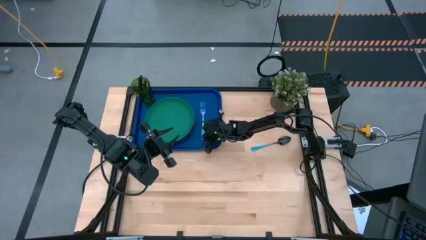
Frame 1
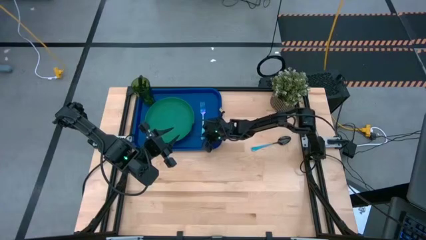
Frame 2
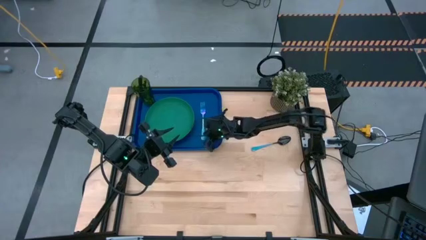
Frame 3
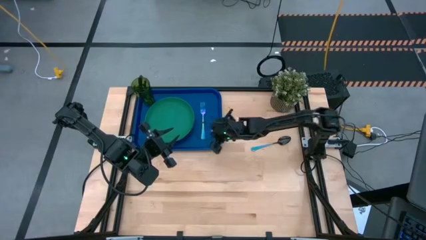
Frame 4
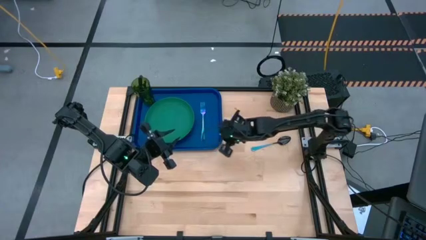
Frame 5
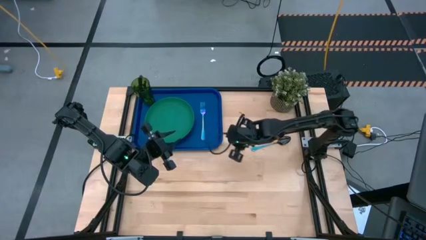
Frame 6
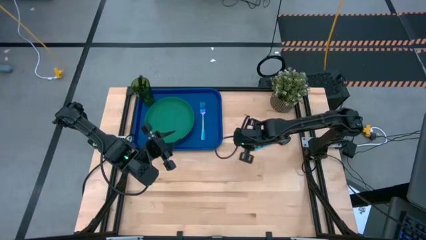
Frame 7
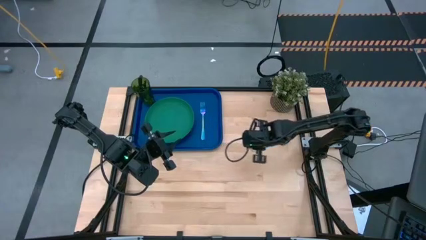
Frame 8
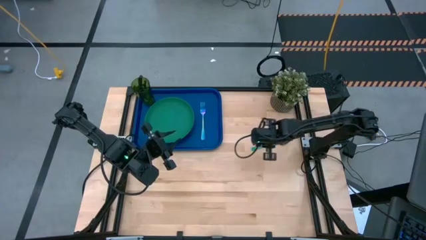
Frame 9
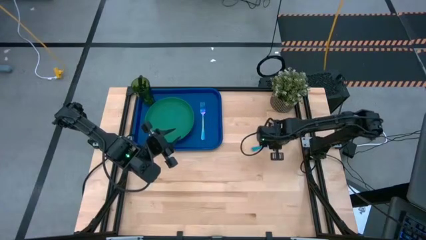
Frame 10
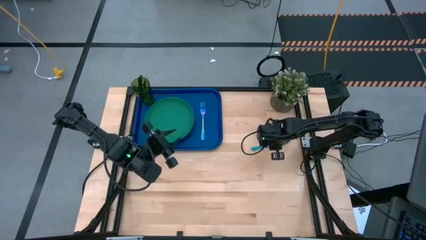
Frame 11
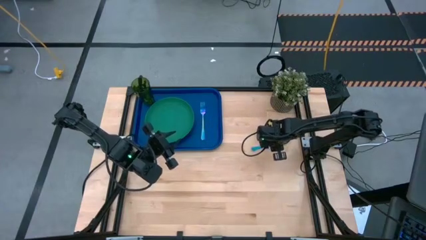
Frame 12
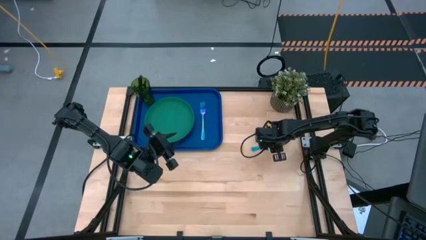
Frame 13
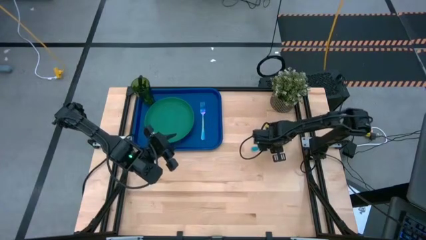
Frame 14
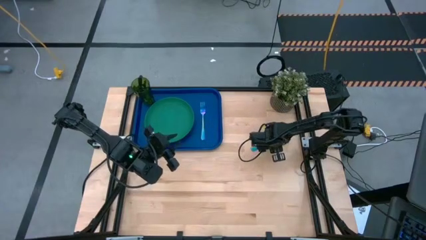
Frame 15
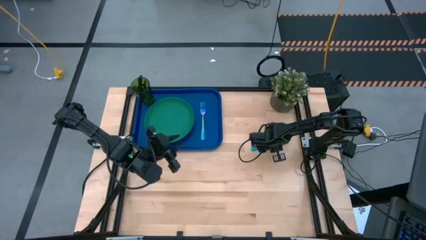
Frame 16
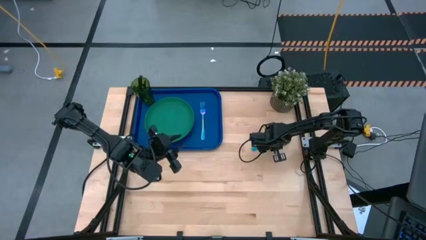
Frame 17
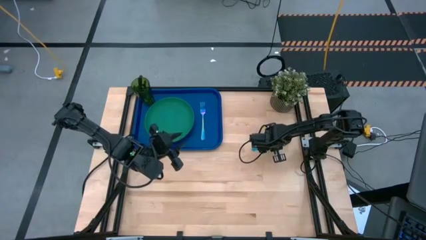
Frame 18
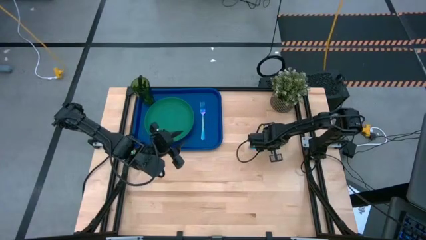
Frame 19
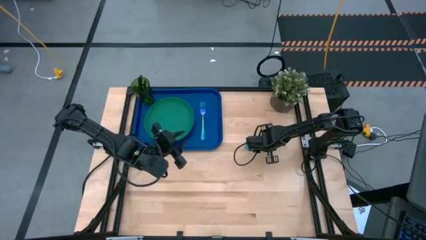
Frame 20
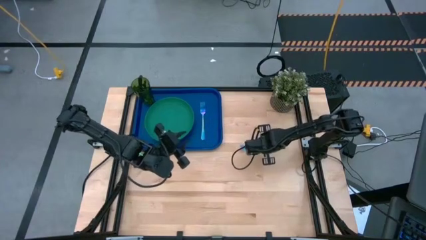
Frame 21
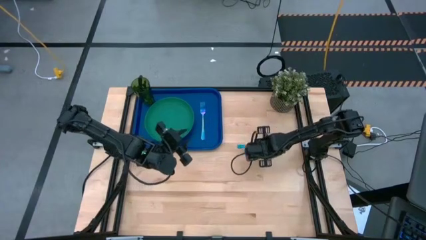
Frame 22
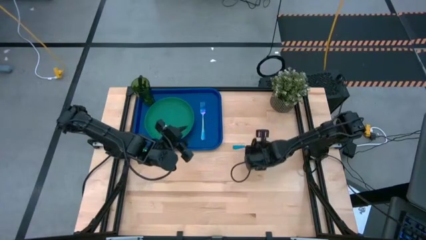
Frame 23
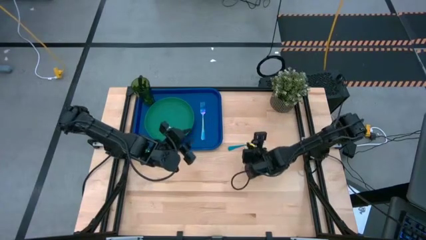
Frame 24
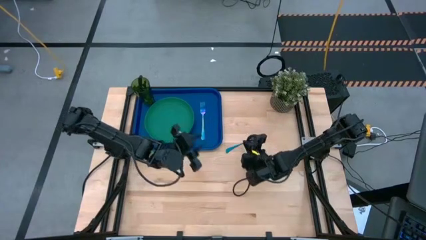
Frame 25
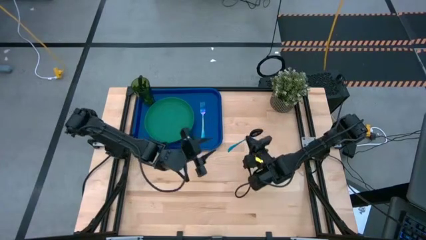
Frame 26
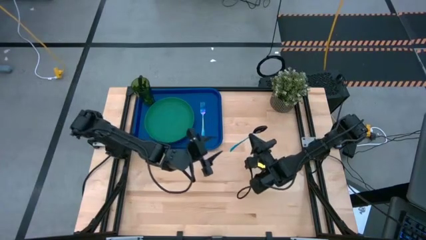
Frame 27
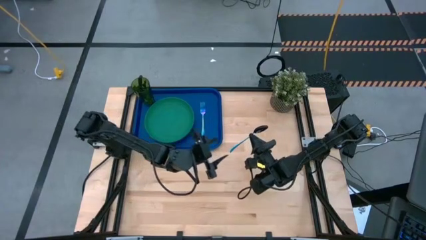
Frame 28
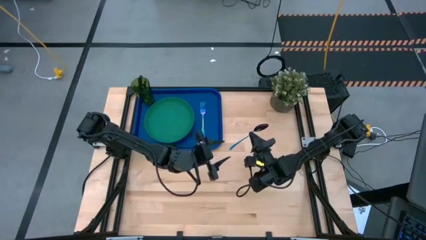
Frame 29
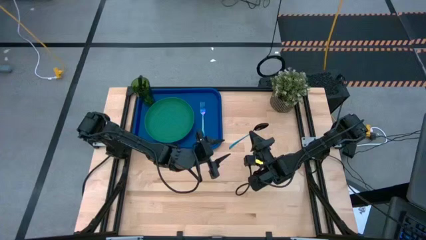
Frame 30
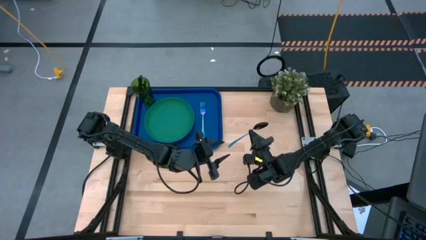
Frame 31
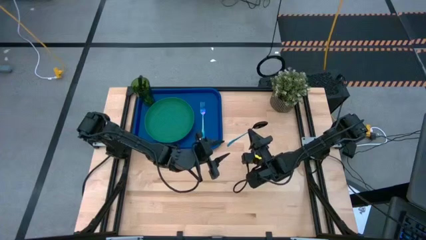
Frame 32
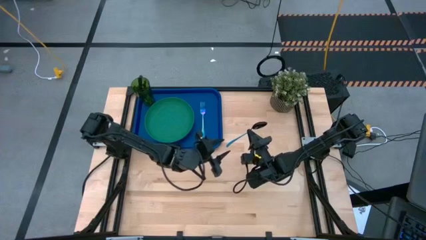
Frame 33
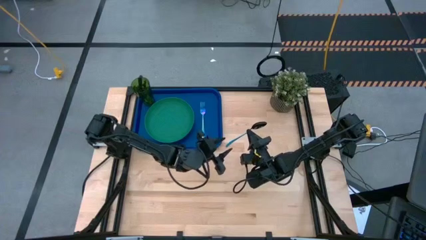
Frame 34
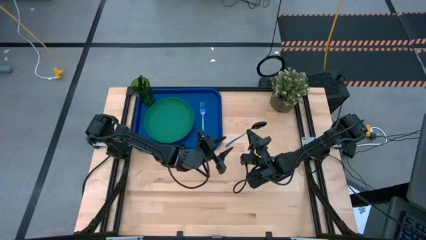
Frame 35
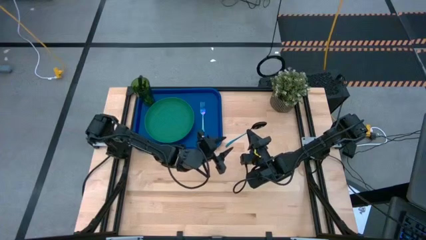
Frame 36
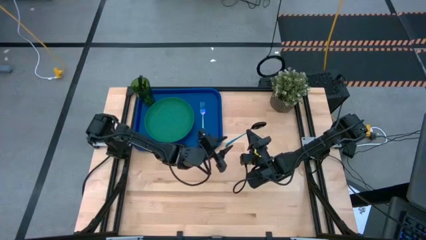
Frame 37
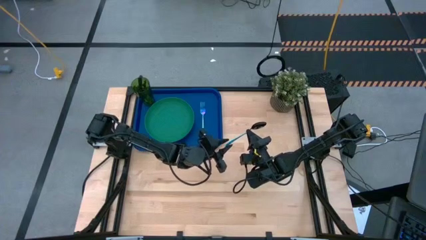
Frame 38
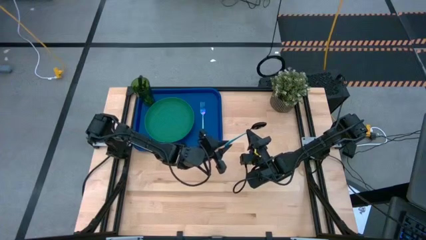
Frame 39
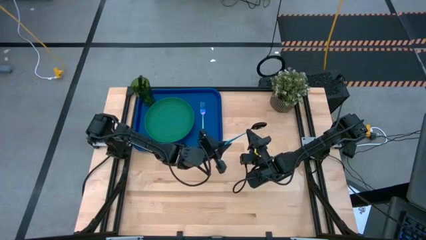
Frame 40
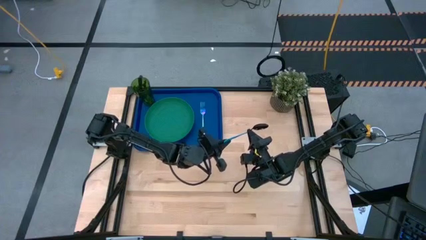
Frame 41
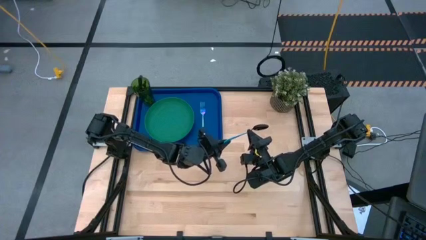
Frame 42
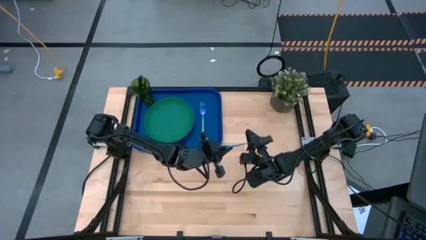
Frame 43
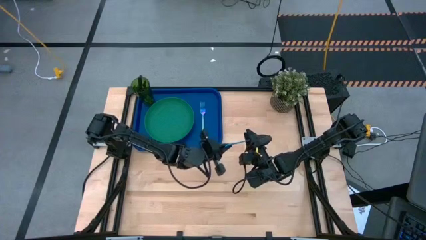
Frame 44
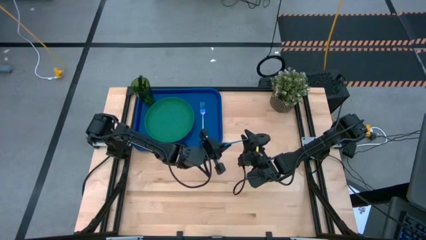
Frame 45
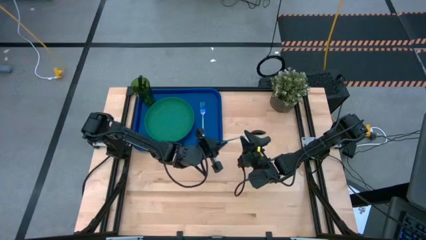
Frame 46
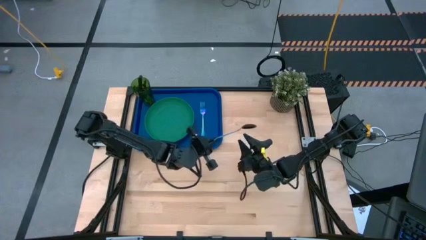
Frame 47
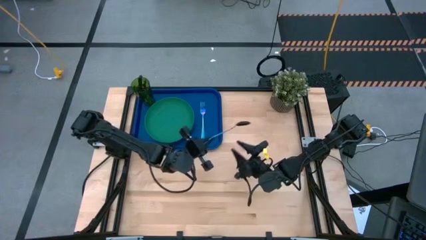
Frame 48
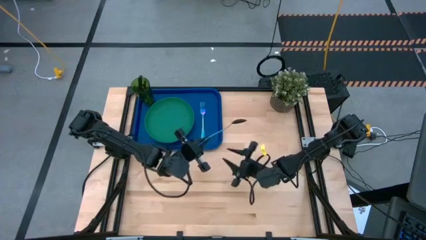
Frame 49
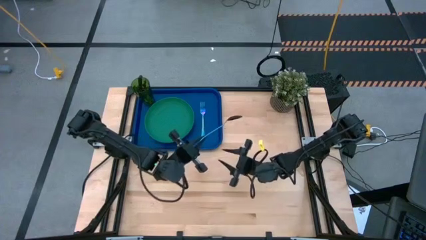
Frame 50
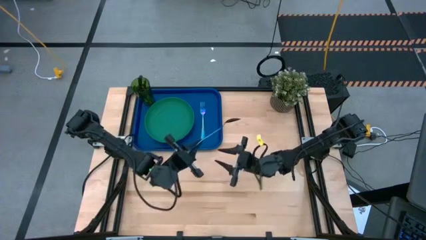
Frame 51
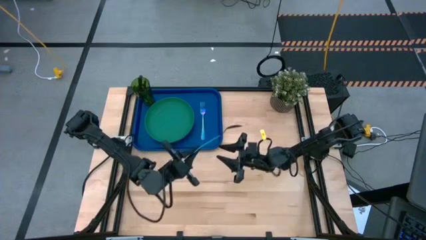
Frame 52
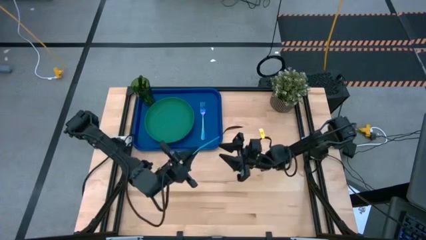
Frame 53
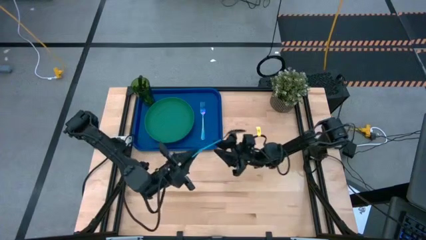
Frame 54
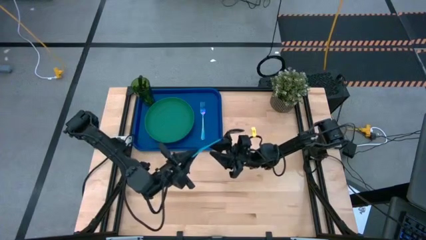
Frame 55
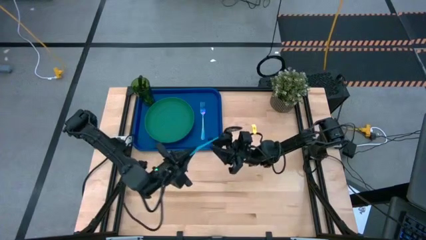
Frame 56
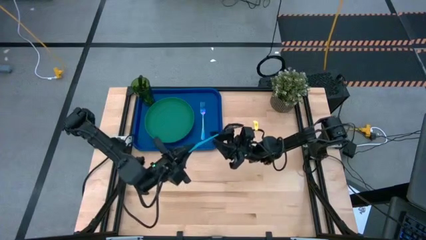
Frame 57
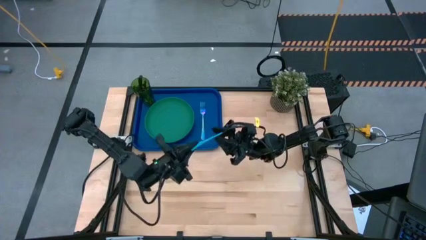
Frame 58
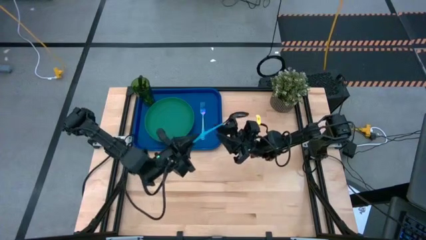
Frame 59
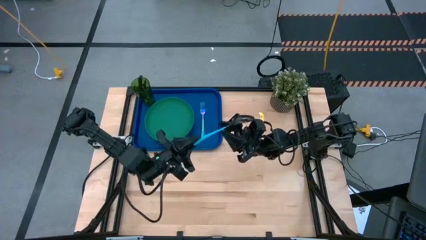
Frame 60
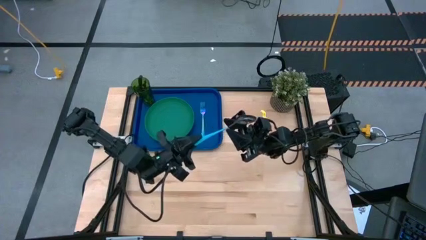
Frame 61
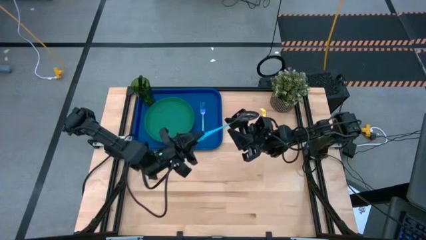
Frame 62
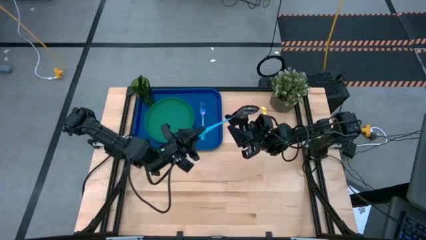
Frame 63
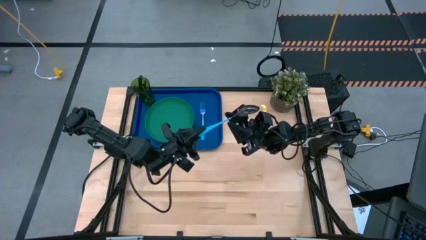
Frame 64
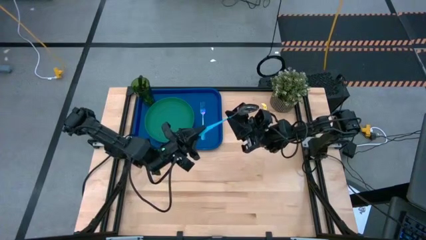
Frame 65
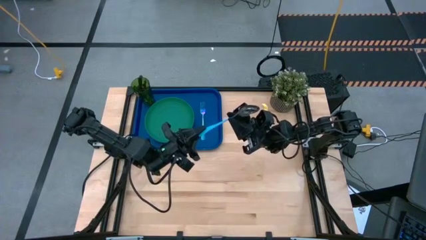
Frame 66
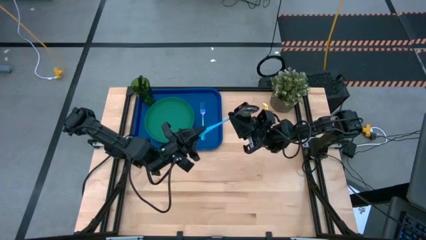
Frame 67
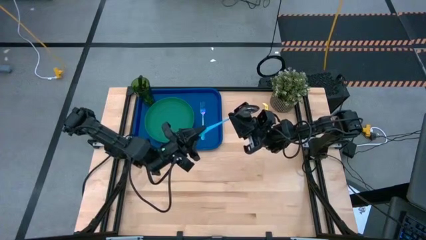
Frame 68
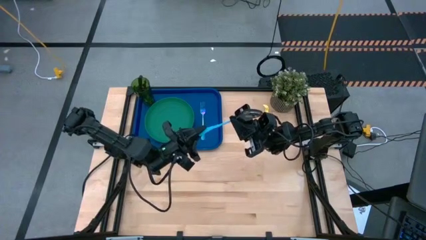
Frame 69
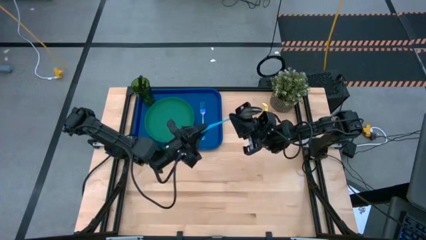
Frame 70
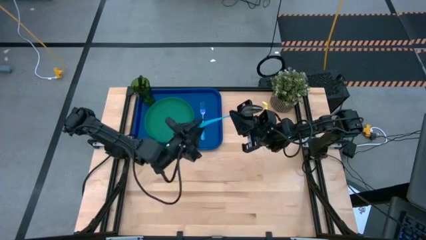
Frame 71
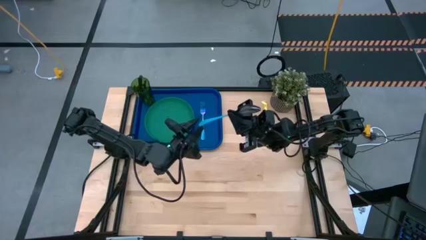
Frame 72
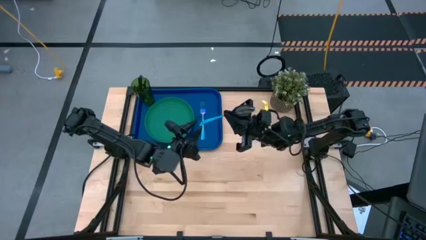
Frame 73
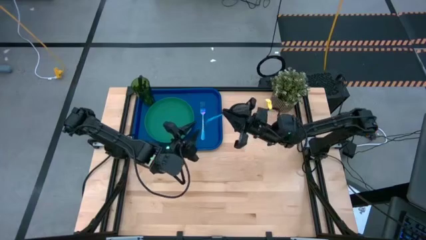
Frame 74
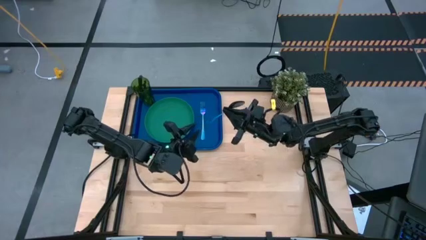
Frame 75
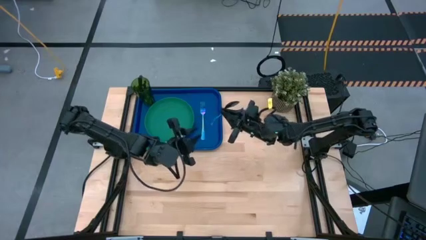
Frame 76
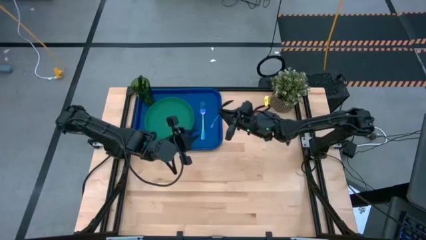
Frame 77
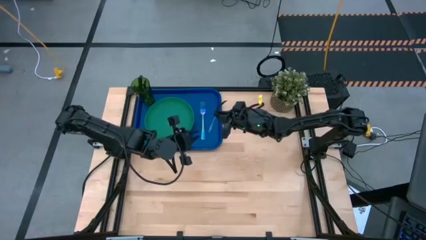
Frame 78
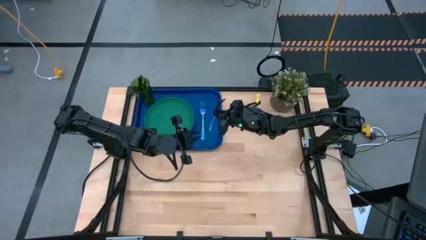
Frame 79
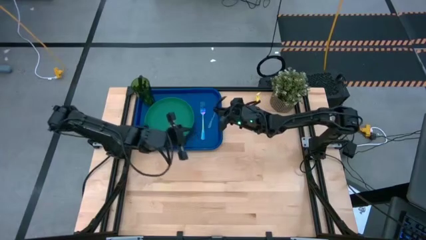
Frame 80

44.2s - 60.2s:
Task: Pick and place plate/cup/fork/spoon on tray
Put the blue spoon on the blue serving tray to the right of the blue fork
